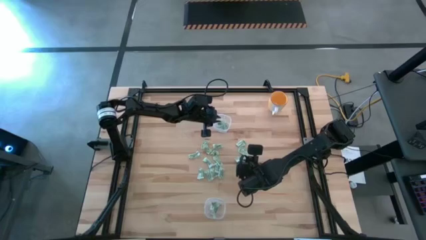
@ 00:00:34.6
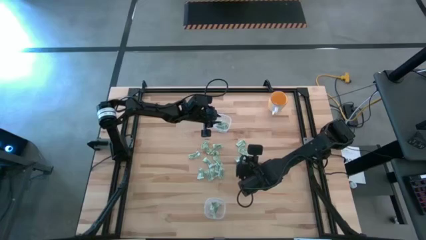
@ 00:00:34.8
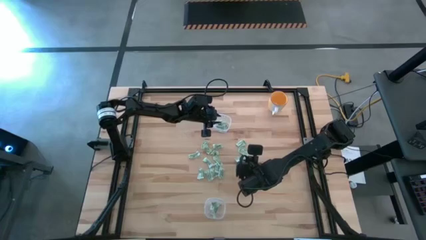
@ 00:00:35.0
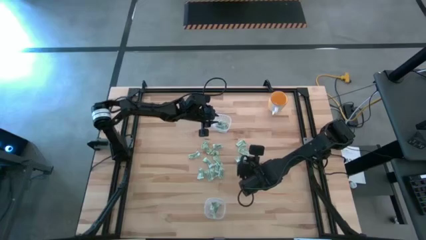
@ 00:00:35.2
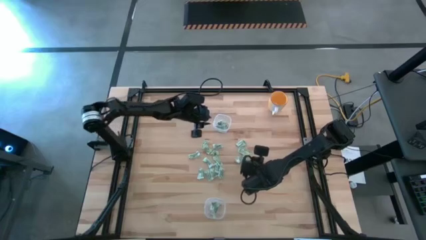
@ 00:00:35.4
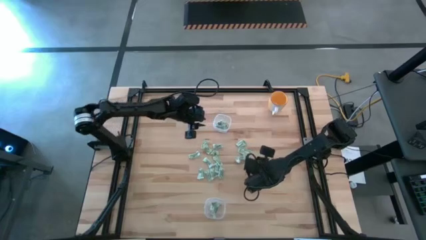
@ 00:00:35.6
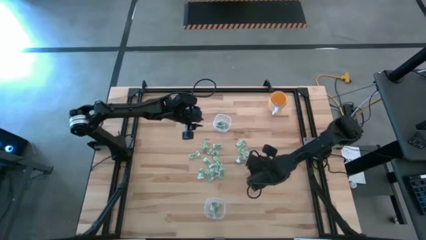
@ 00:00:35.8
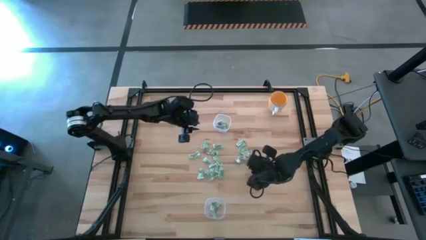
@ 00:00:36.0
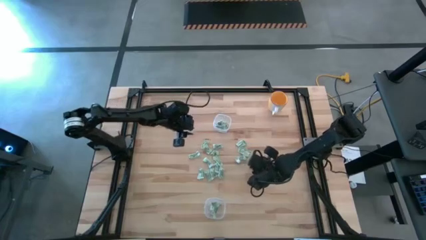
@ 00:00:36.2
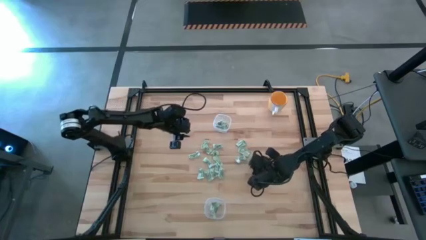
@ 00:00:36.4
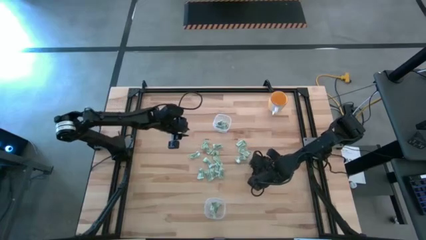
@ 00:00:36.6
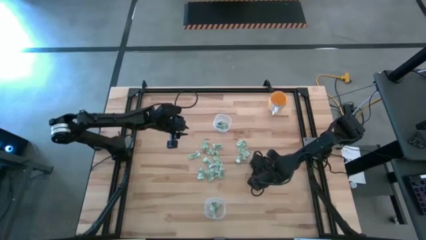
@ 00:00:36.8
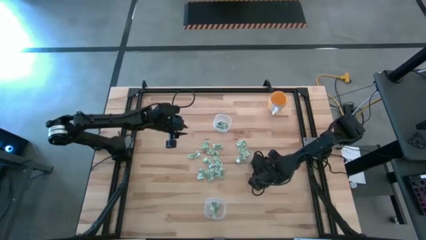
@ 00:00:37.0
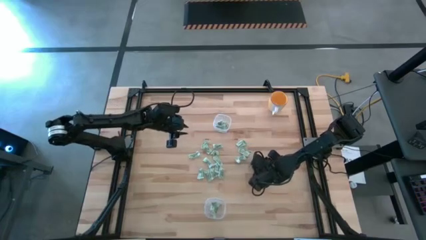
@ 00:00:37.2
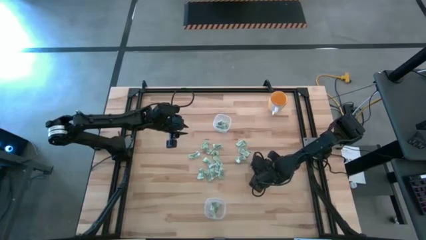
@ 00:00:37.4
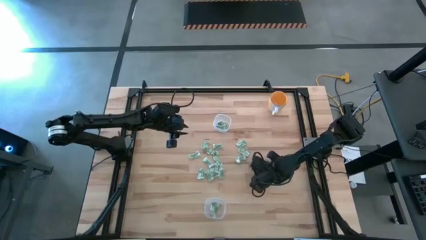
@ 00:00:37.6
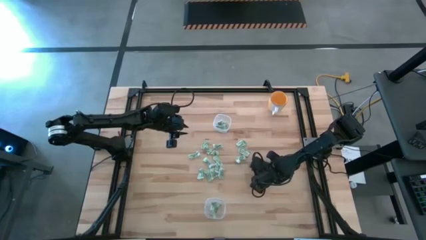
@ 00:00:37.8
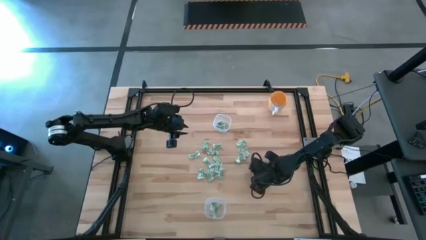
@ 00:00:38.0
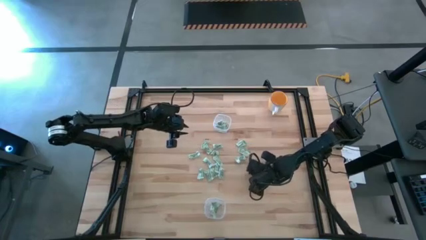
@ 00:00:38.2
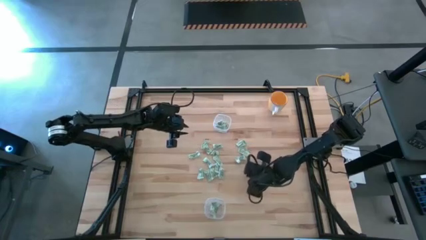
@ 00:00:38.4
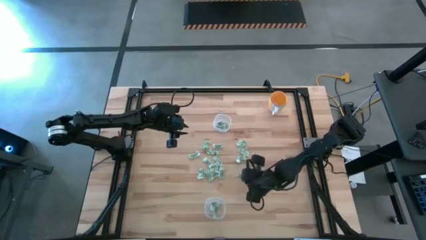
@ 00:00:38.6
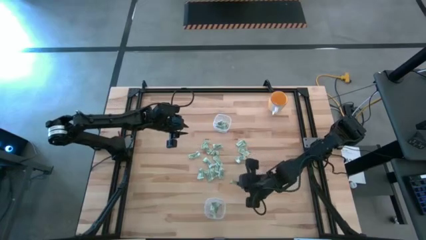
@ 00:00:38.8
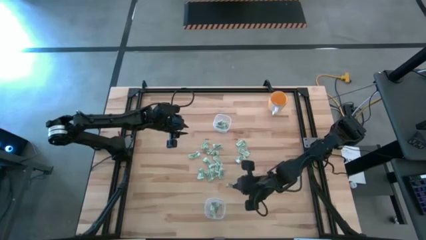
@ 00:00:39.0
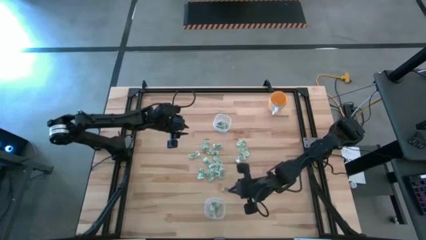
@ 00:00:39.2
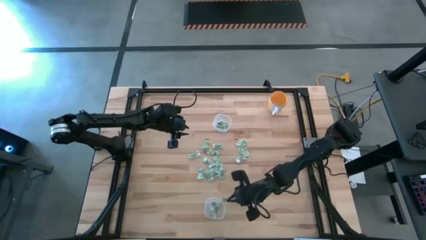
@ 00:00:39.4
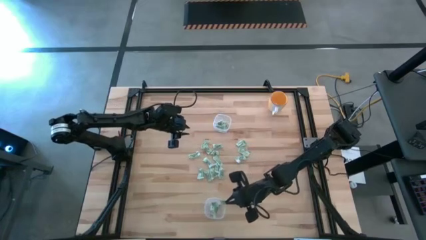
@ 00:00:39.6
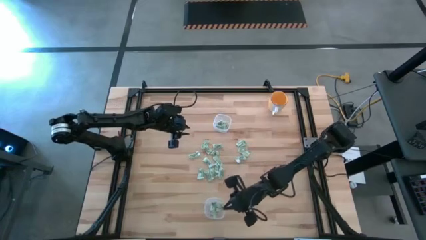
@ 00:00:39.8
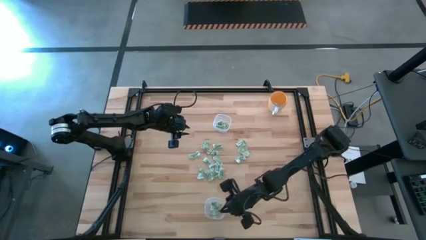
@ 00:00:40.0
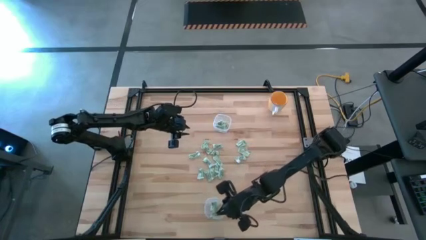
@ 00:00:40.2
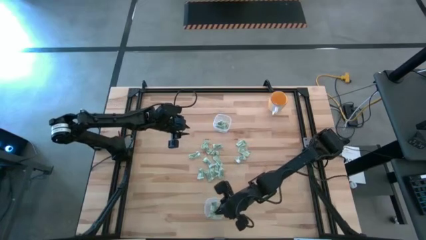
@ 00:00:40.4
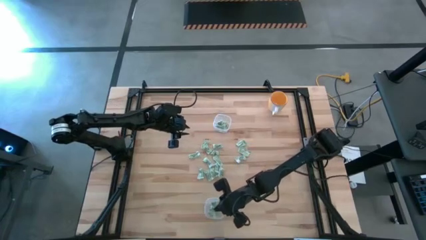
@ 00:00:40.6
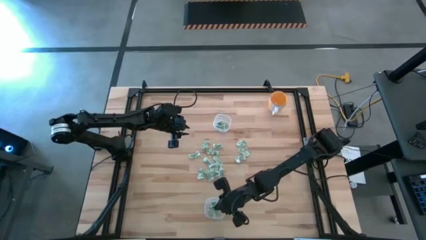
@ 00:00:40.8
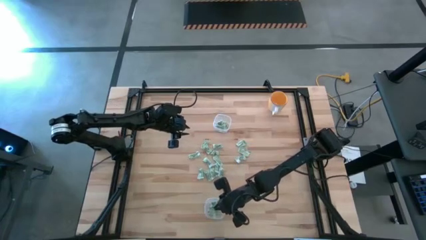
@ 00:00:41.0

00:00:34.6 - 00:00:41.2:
Task: Pick and place items into bin
Put the stevia packet into the bottom transparent bin

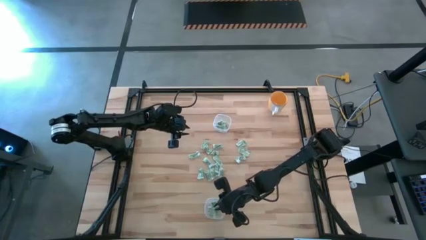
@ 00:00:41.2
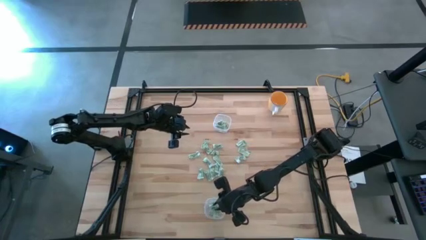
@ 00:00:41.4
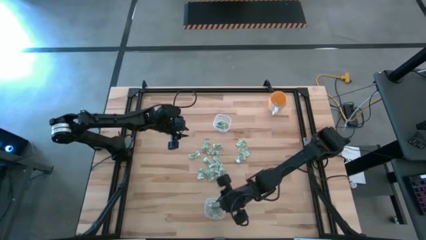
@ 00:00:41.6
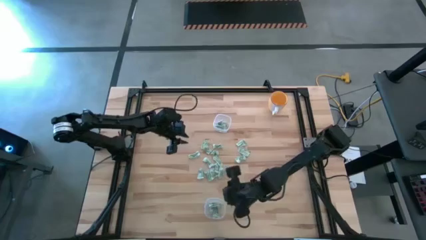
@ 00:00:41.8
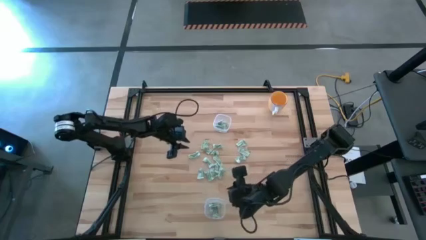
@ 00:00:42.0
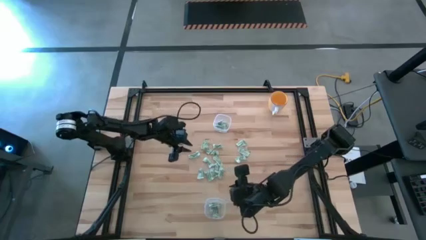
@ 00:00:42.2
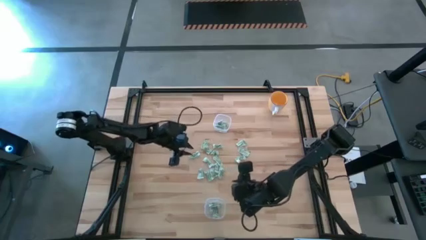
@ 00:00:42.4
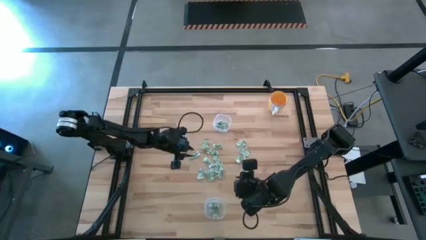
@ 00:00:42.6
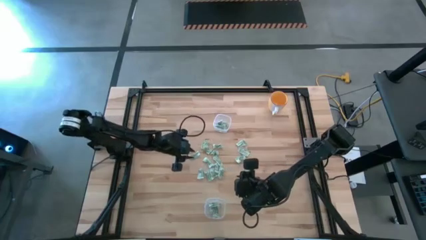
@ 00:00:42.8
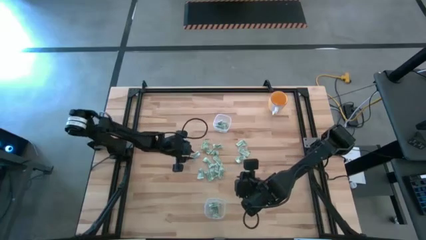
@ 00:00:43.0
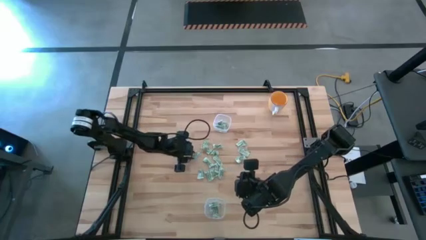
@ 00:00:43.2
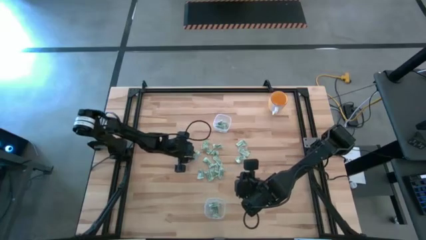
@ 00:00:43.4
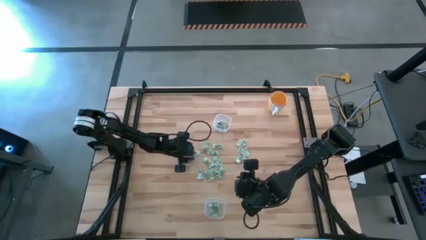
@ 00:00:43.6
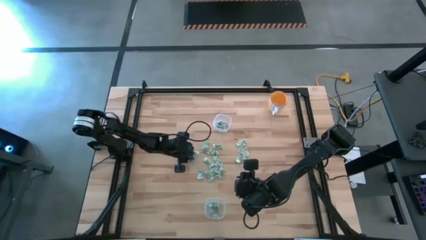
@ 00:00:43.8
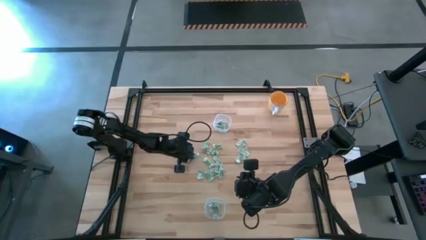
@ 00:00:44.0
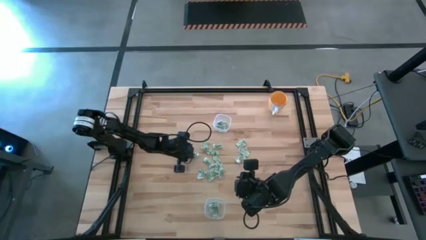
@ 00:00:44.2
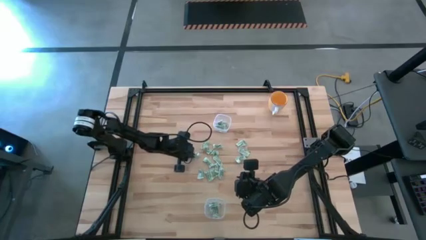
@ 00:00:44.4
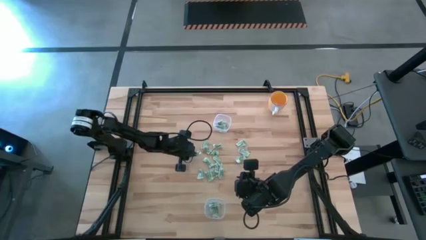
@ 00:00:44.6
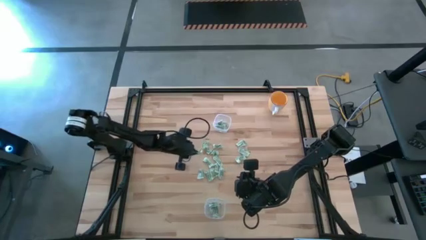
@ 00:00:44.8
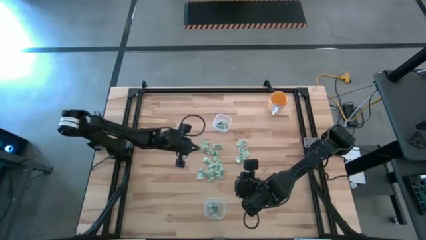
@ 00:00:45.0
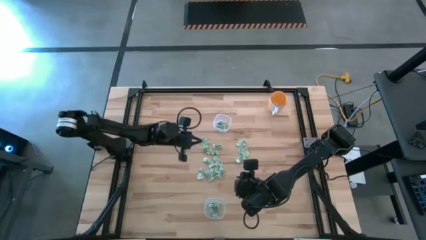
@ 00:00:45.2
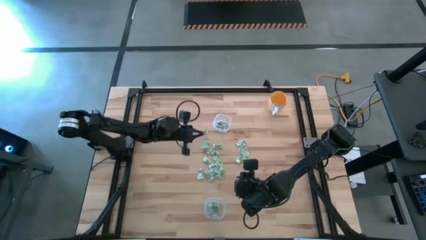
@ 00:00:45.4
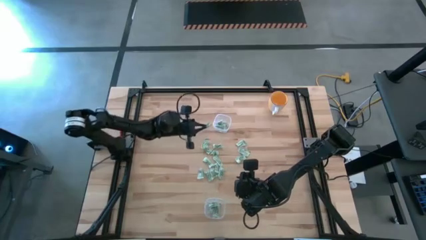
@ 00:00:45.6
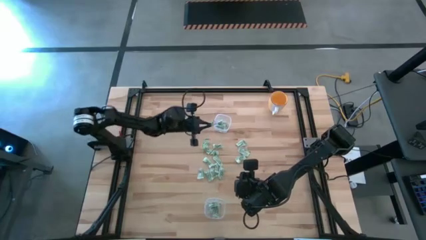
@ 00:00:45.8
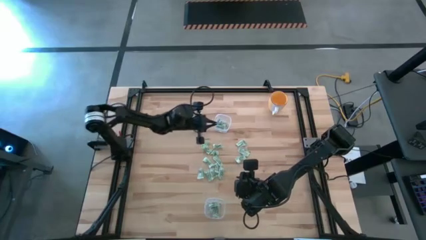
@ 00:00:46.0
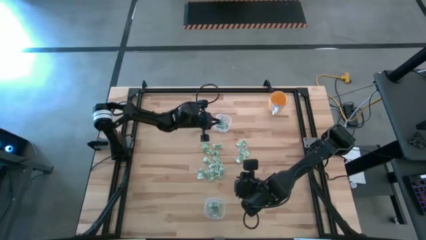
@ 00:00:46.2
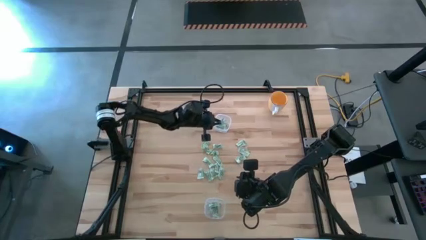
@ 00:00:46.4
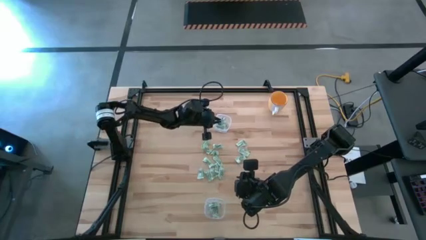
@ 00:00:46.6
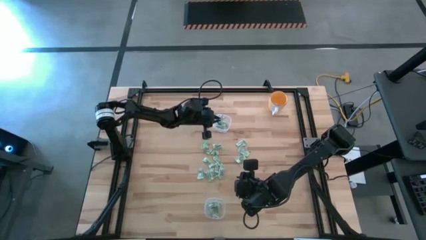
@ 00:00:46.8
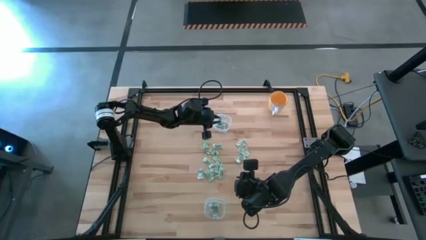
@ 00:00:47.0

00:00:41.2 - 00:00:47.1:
Put the stevia packet into the top transparent bin

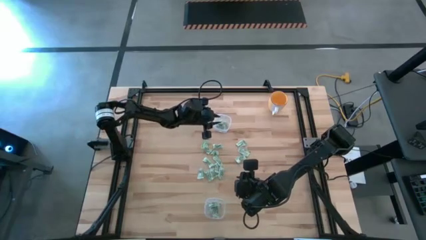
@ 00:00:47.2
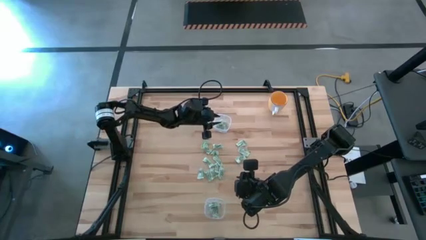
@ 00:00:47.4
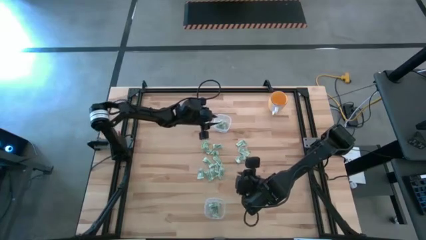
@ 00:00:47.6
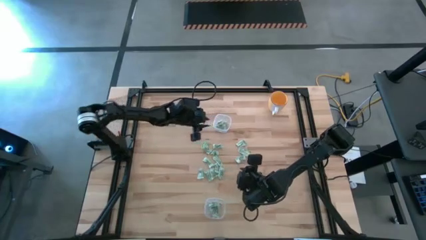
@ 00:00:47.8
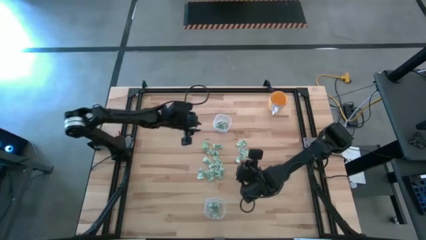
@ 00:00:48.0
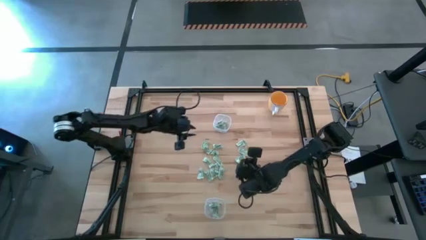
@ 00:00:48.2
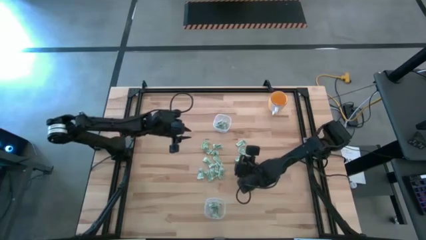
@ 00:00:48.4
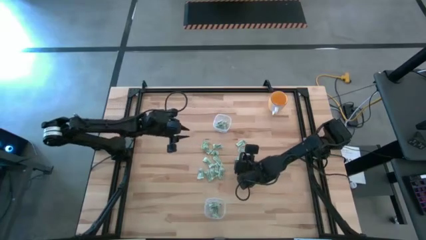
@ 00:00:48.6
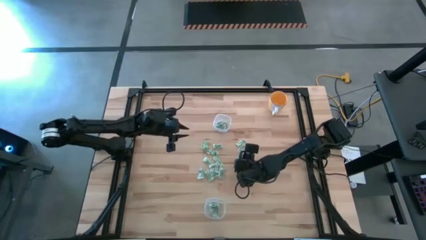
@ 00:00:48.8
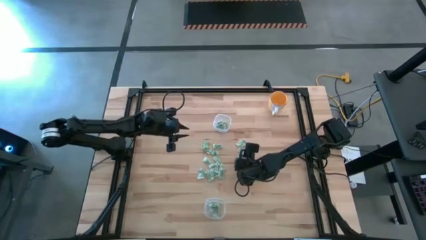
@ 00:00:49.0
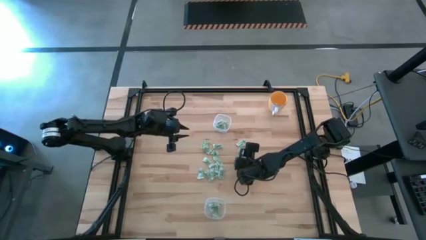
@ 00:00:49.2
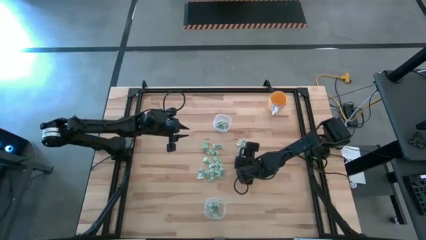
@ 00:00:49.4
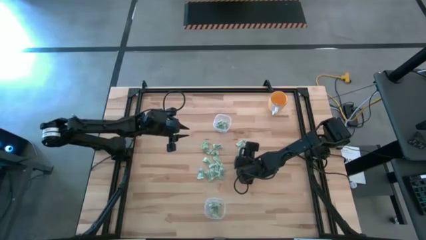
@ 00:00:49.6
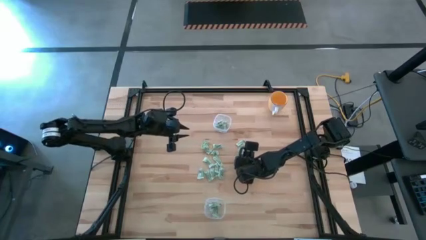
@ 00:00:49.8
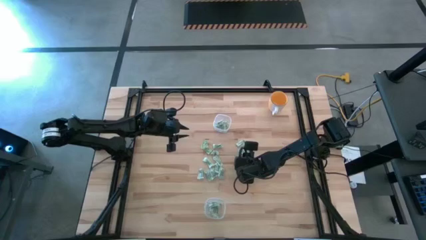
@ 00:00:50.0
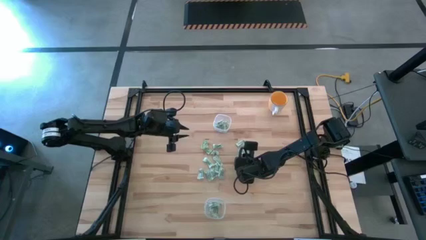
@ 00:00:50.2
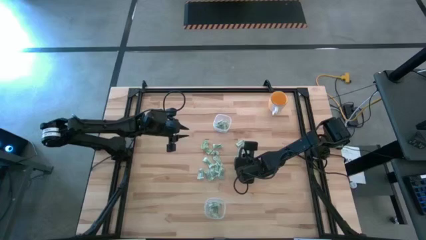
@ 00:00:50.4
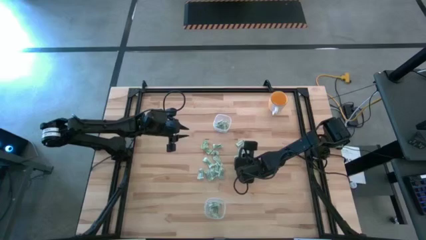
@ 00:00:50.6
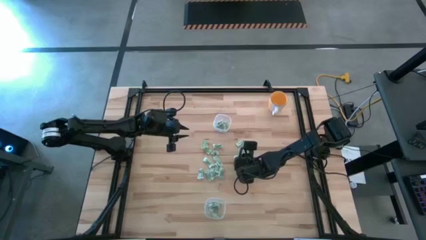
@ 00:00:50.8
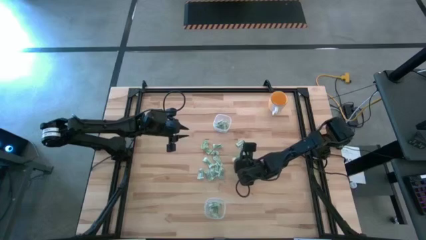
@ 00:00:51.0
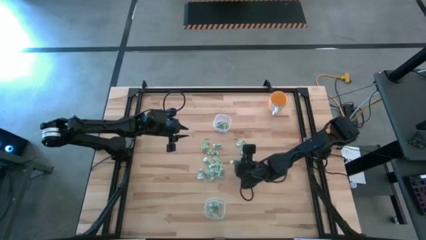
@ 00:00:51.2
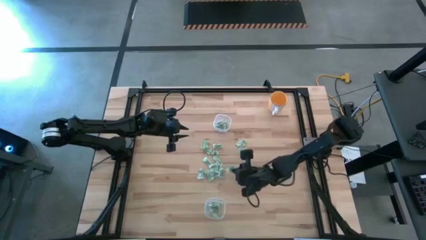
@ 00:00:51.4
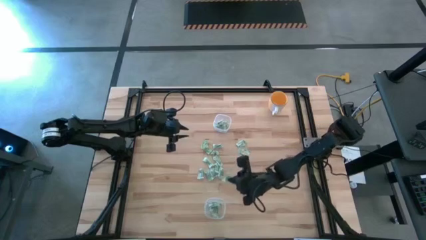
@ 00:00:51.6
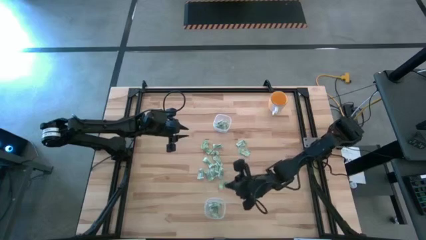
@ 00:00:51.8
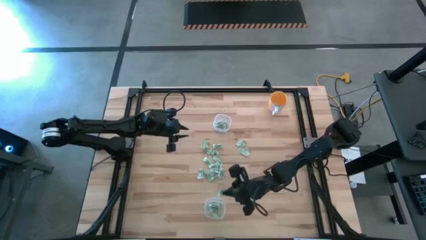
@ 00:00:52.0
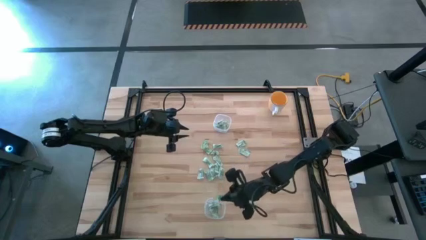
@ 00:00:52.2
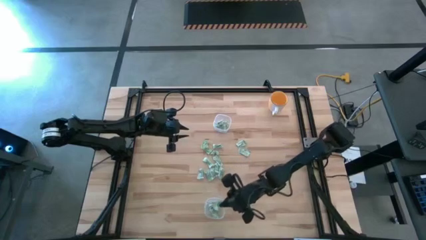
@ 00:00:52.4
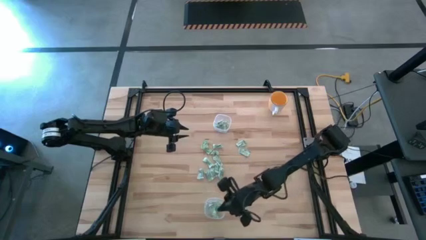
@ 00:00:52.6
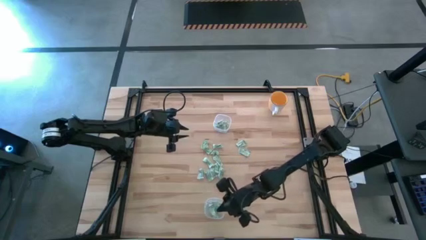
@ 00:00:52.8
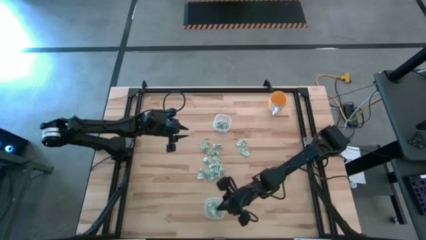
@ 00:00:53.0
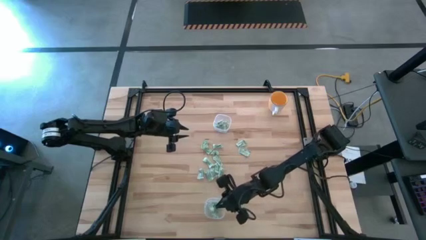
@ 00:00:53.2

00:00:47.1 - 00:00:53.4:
Put the stevia packet into the bottom transparent bin
